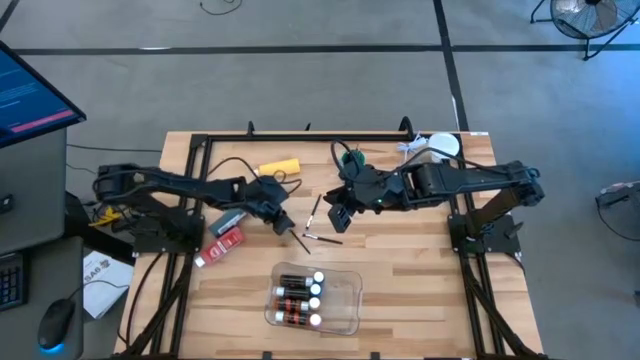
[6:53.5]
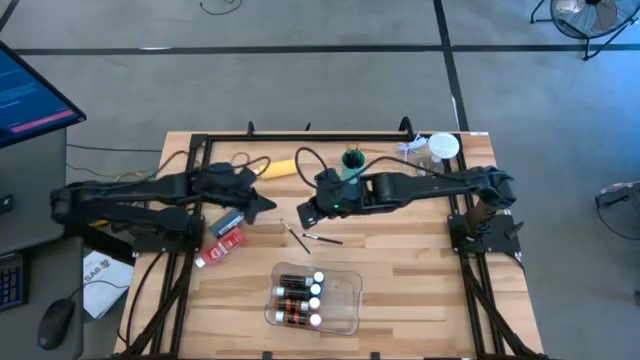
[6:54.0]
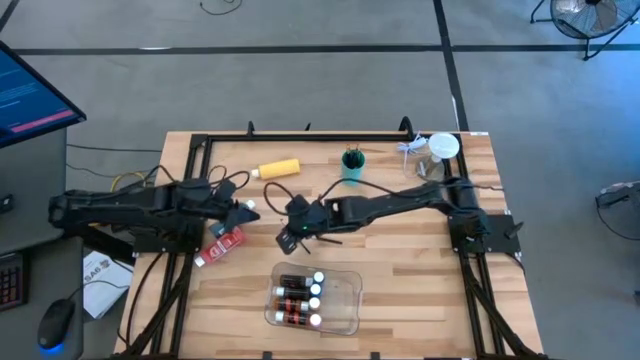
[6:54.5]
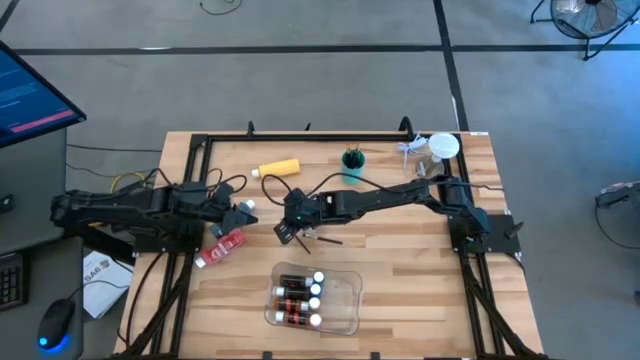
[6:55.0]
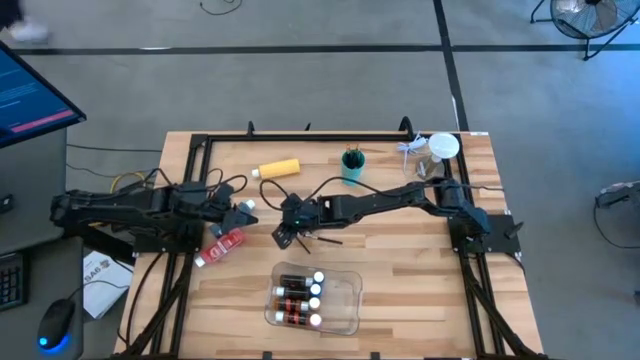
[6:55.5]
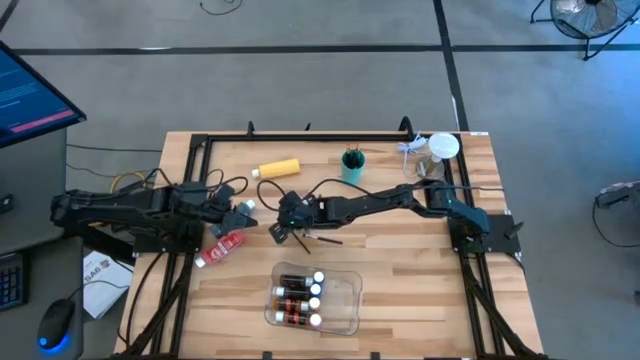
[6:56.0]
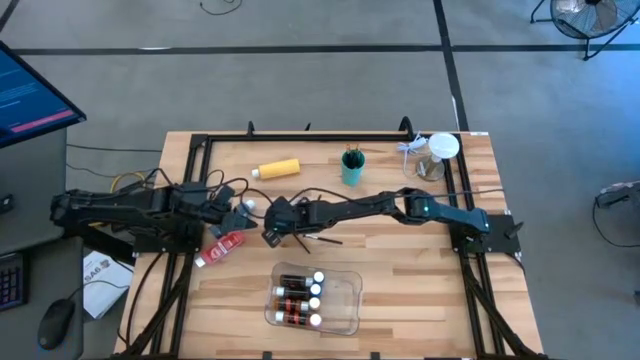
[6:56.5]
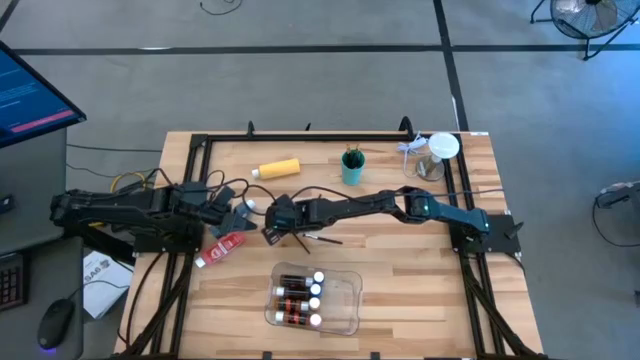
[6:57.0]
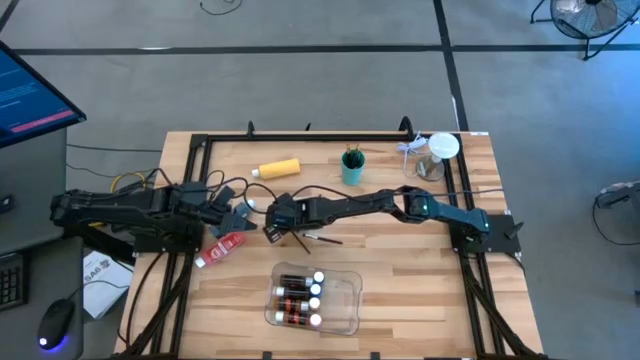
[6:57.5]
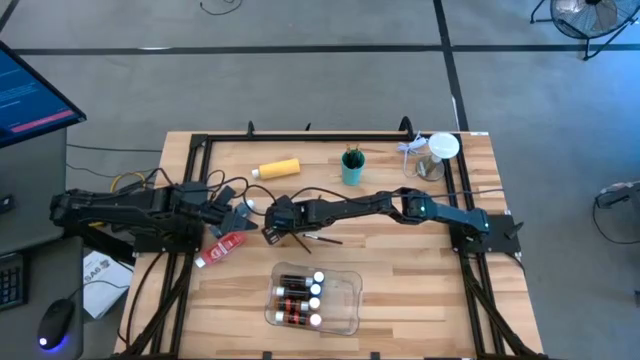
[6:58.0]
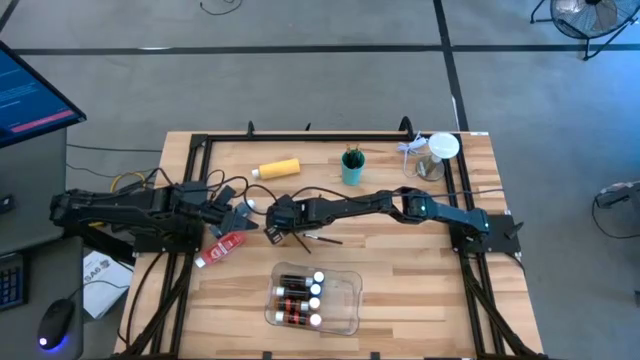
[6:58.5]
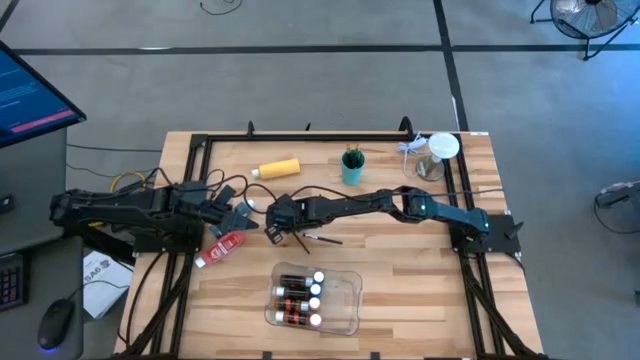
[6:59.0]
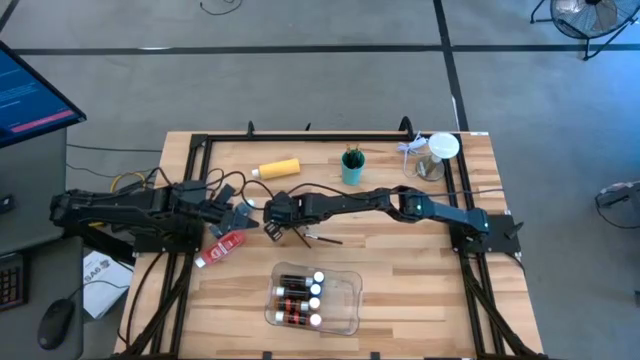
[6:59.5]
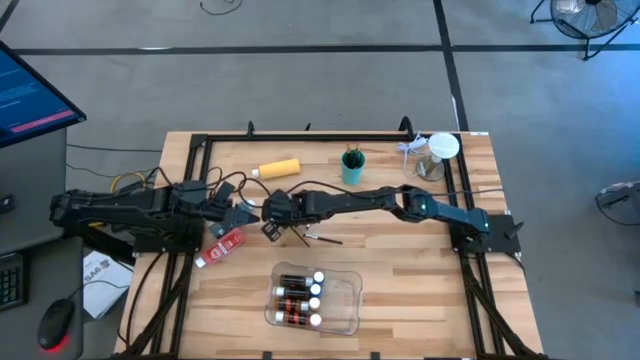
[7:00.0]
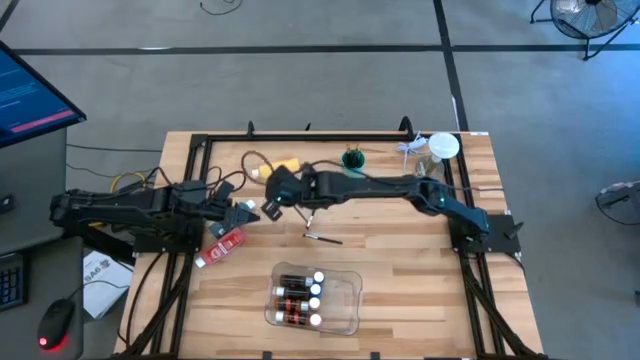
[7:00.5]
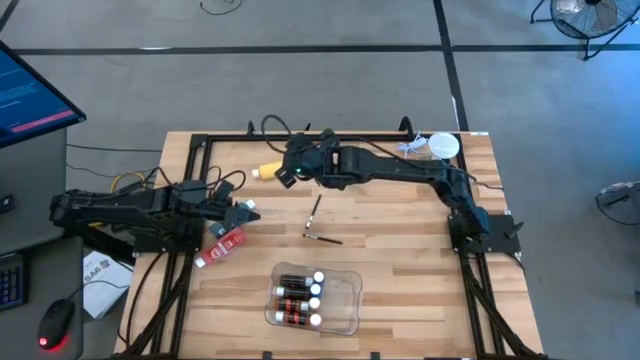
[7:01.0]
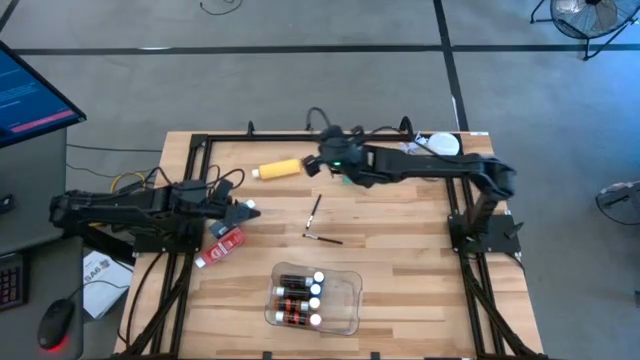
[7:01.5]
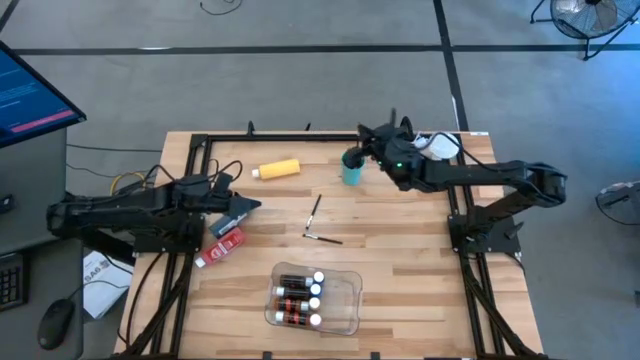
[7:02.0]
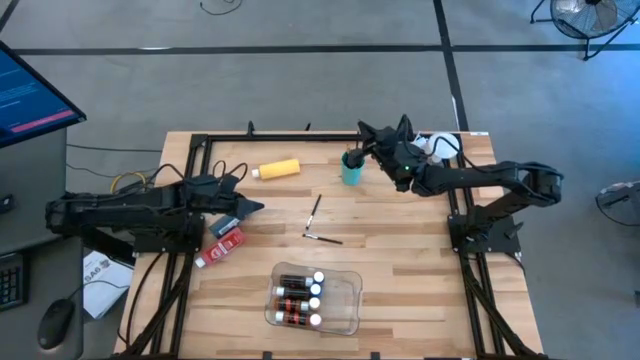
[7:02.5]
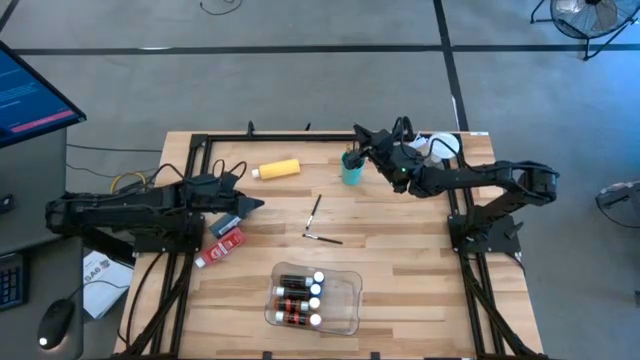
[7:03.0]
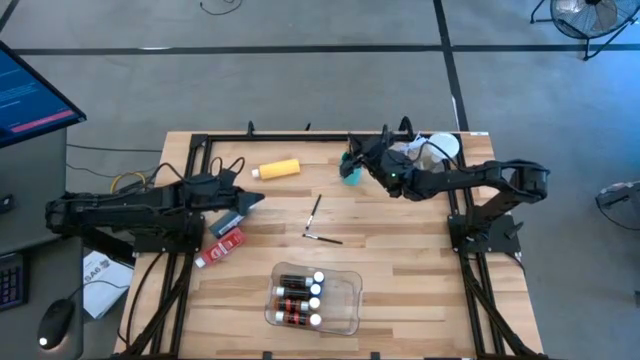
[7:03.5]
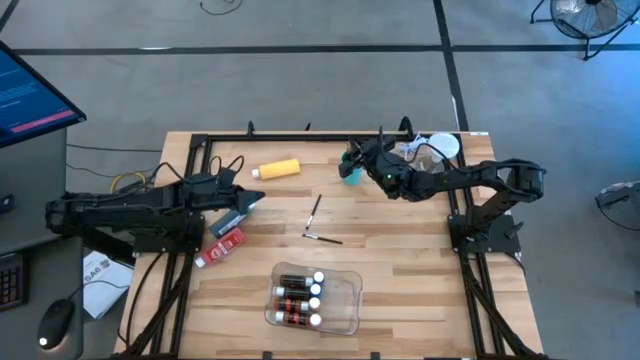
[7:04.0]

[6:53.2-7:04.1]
Task: Pick & Place Paint Supplies
Put the silver paint brush into the green cup

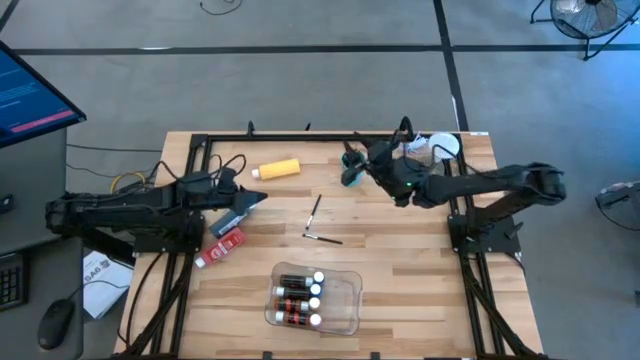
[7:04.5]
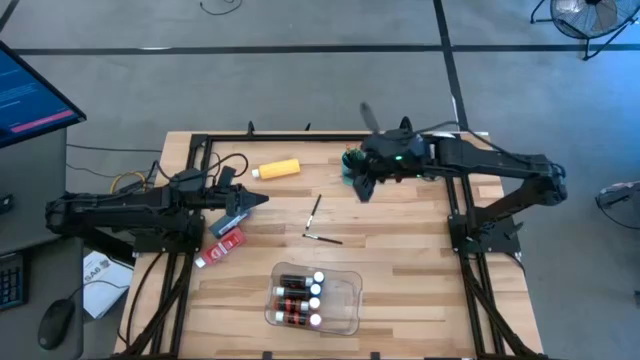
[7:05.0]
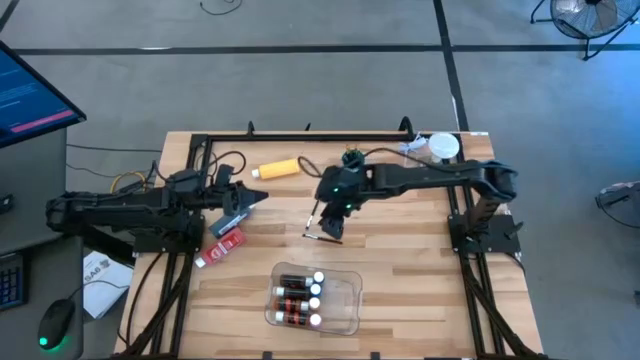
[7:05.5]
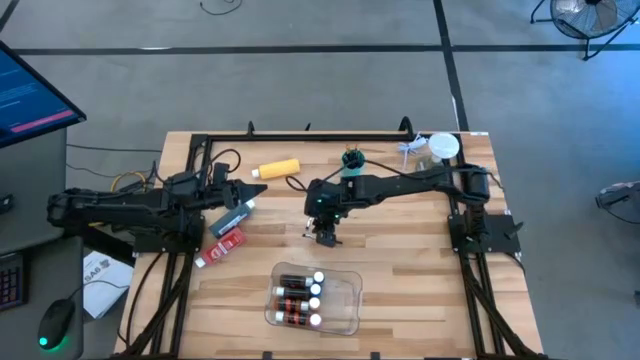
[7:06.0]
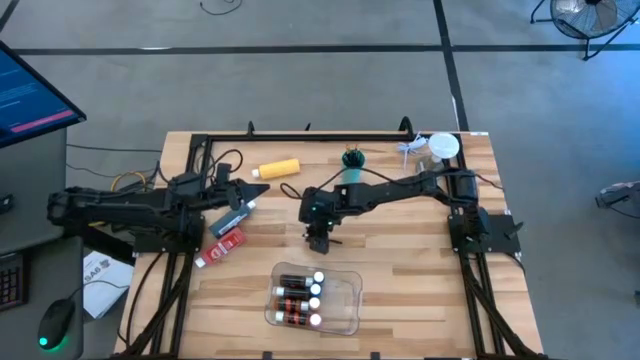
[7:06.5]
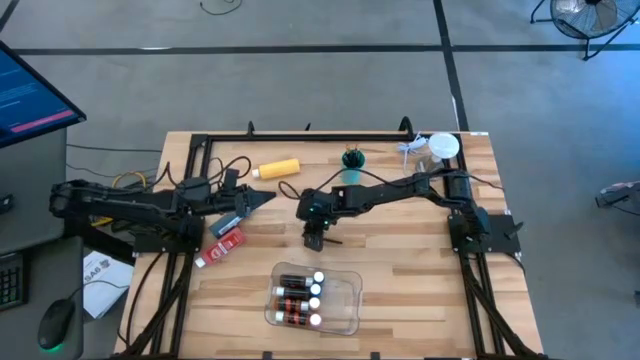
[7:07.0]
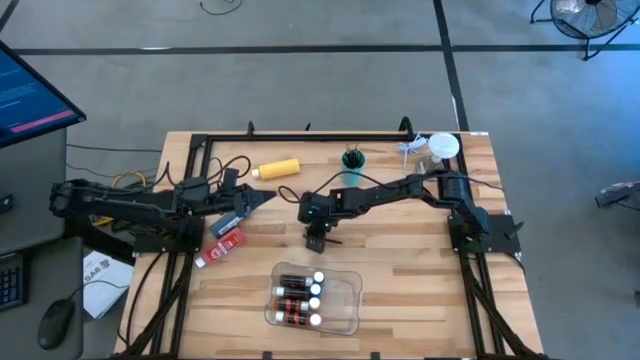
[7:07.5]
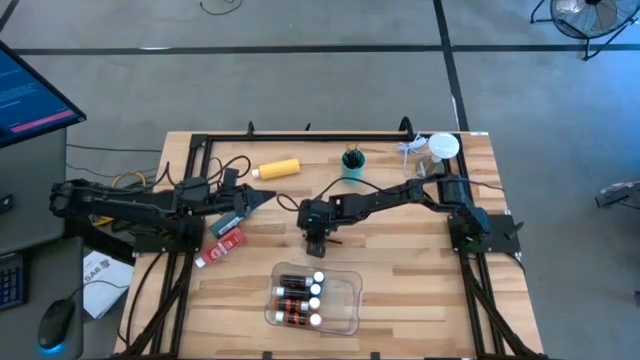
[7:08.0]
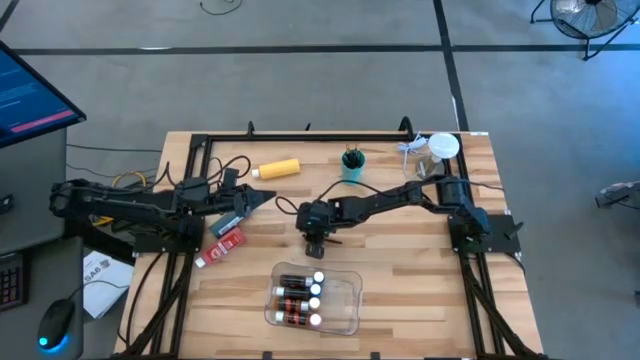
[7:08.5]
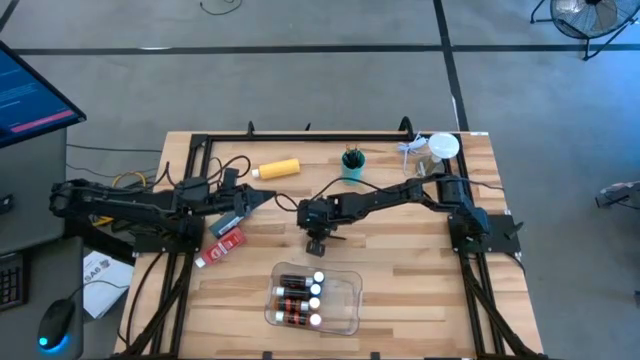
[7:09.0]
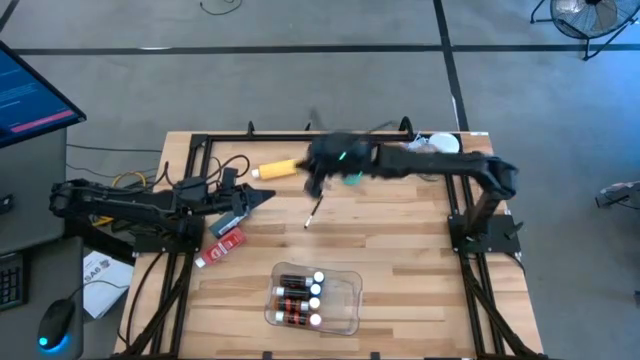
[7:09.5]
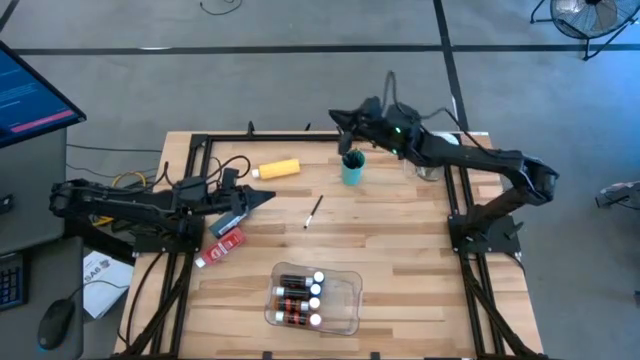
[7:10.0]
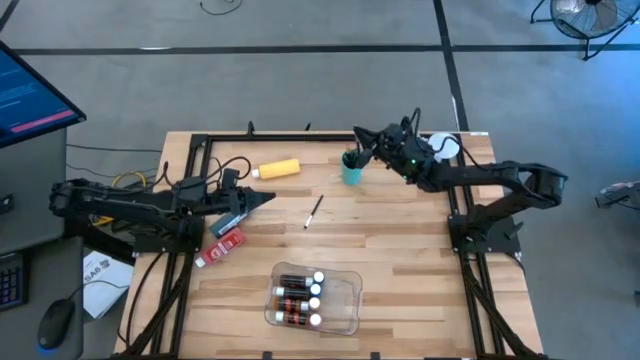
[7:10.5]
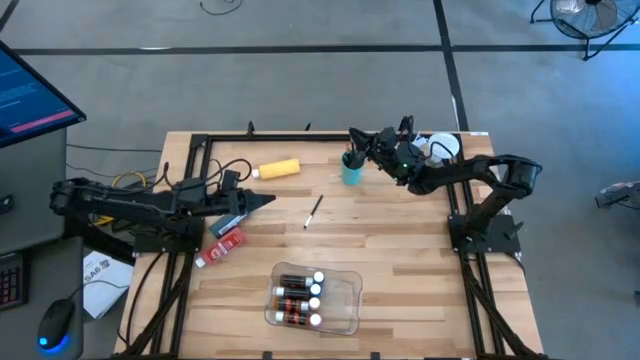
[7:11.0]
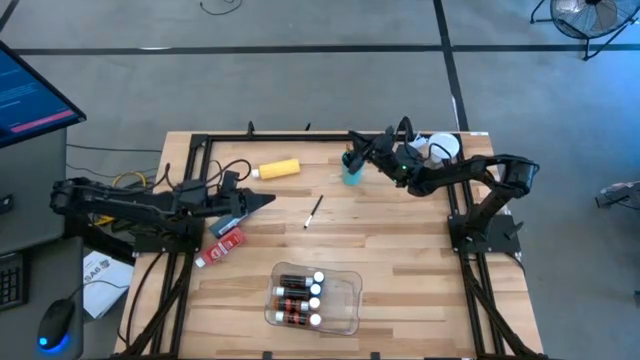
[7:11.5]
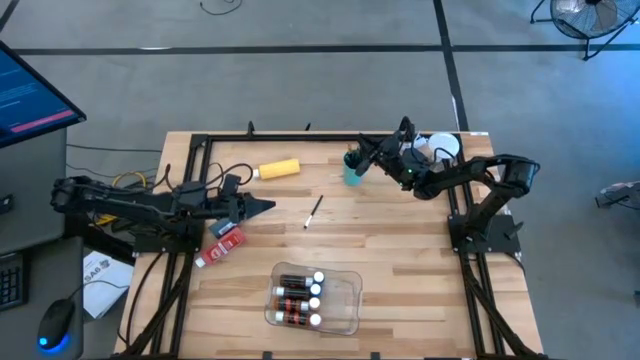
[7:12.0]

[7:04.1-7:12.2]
Put the silver paint brush into the green cup

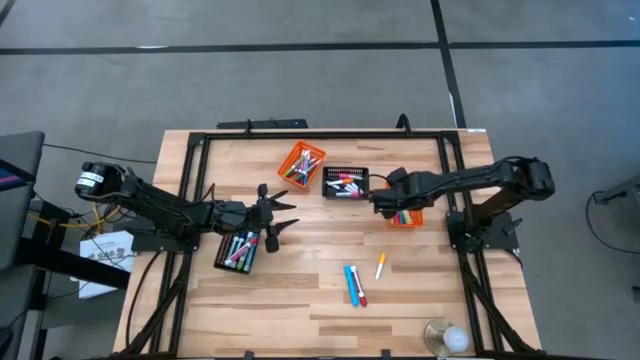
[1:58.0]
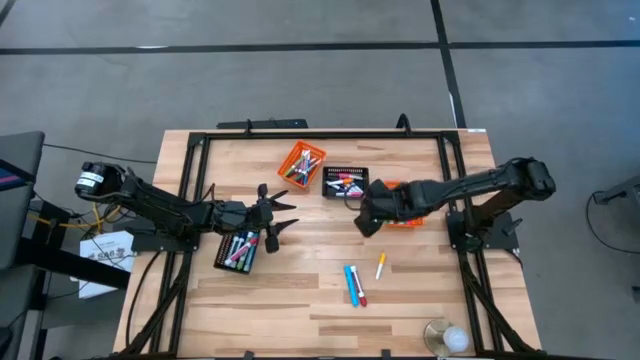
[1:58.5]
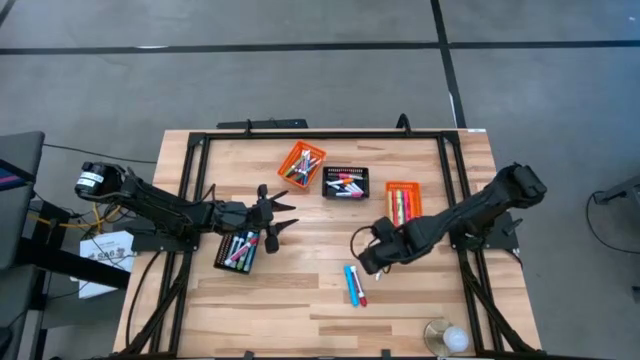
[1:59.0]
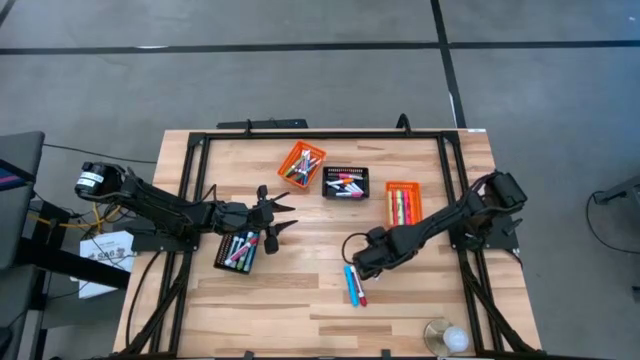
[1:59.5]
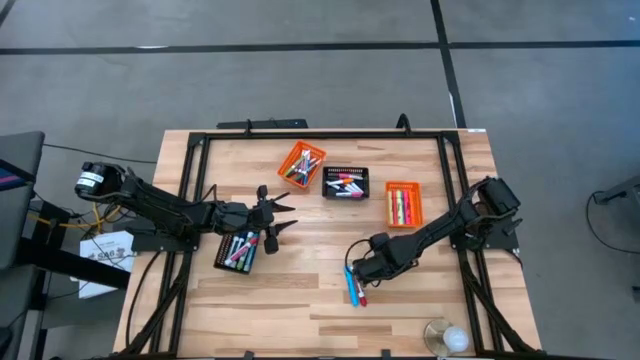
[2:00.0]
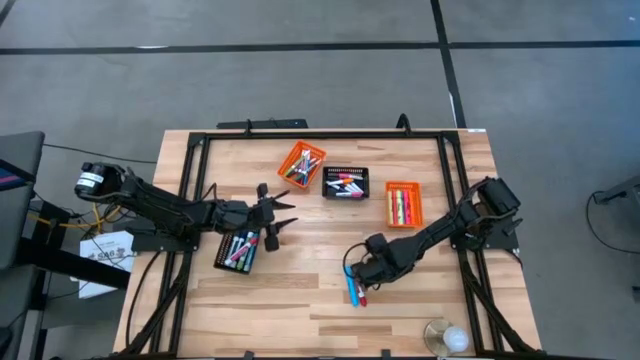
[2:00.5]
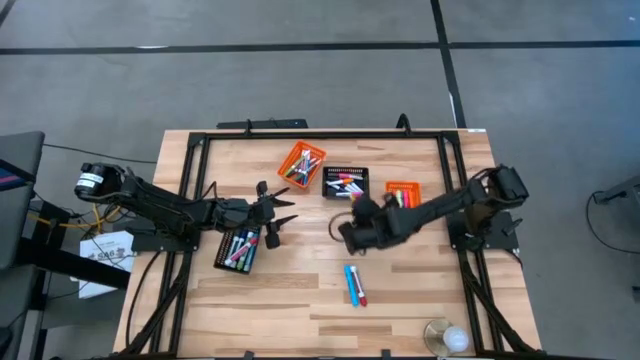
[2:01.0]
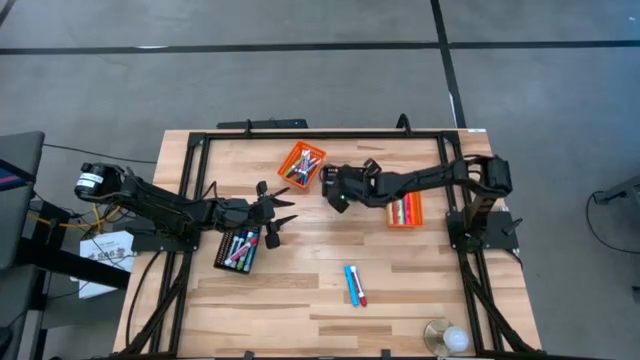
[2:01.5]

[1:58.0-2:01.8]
Task: Pick & Place Markers
Put the yellow highlighter into the right black bin
